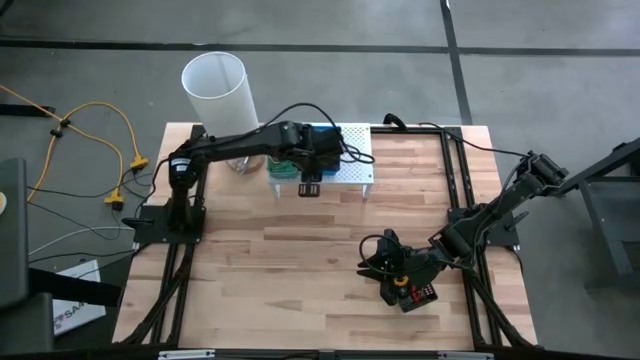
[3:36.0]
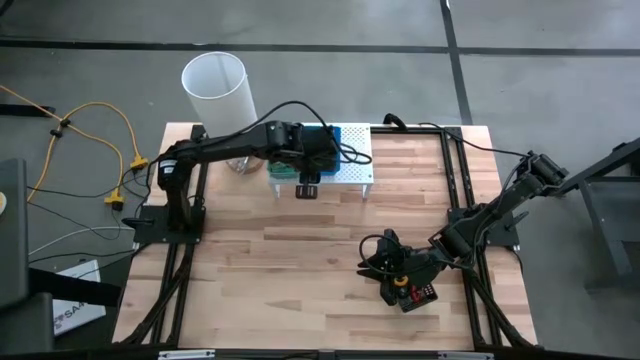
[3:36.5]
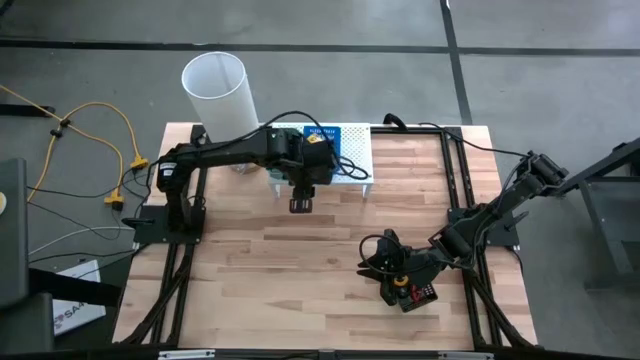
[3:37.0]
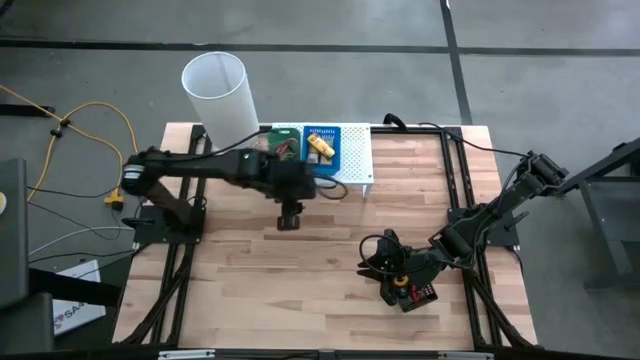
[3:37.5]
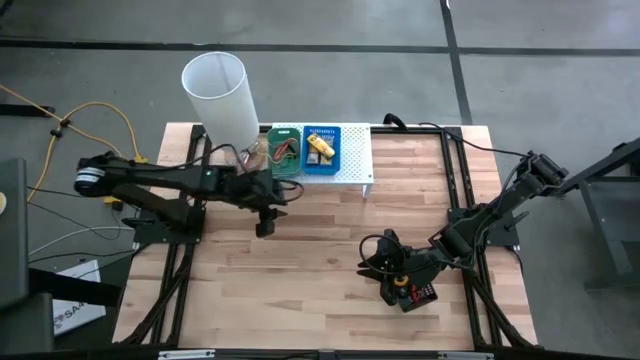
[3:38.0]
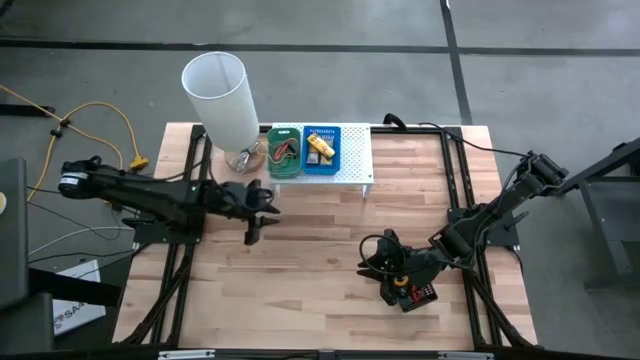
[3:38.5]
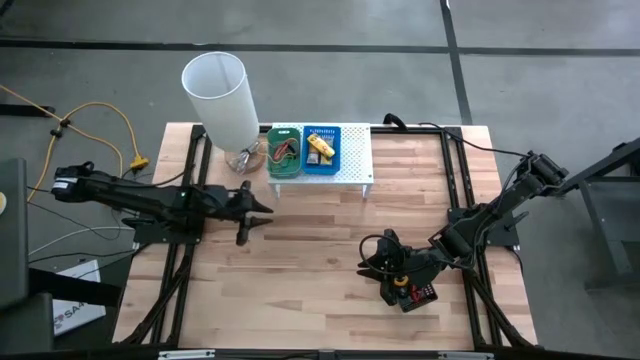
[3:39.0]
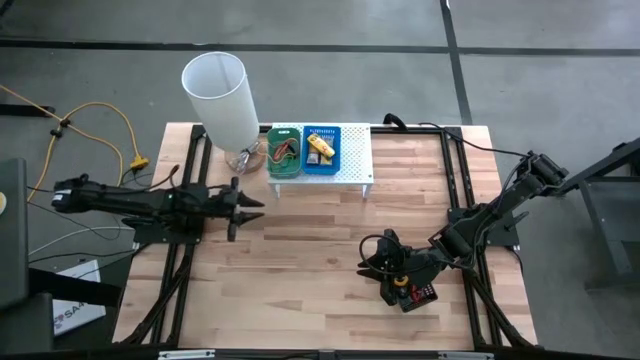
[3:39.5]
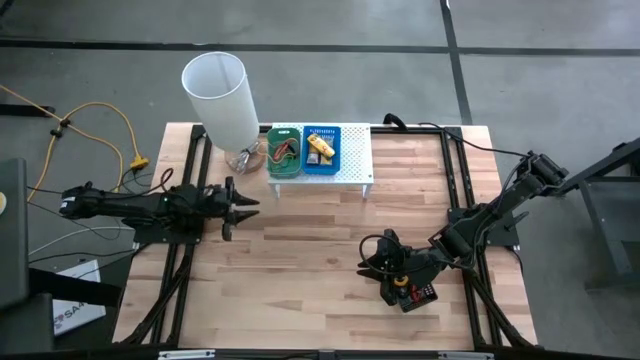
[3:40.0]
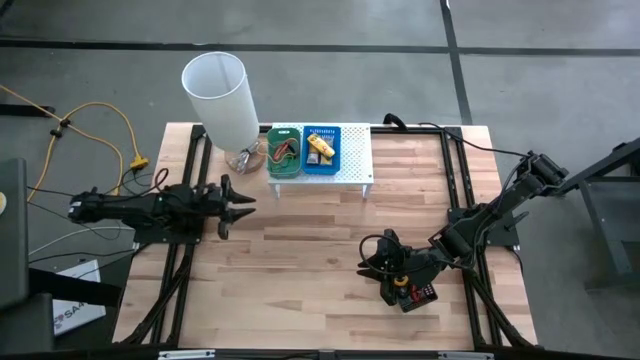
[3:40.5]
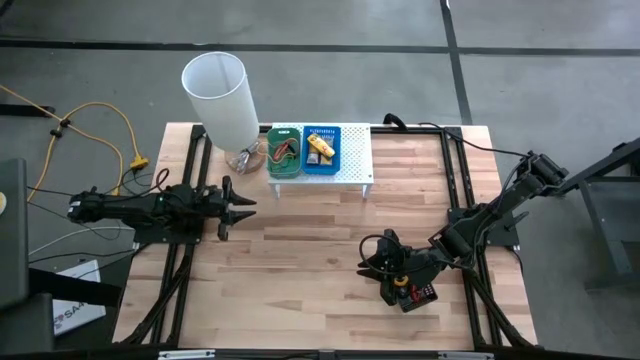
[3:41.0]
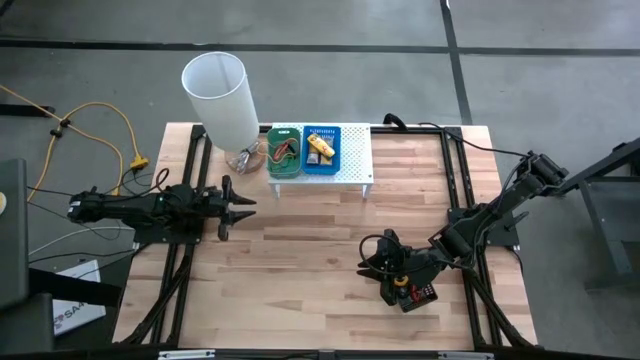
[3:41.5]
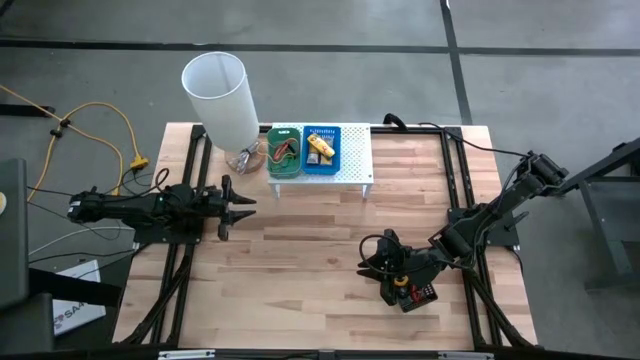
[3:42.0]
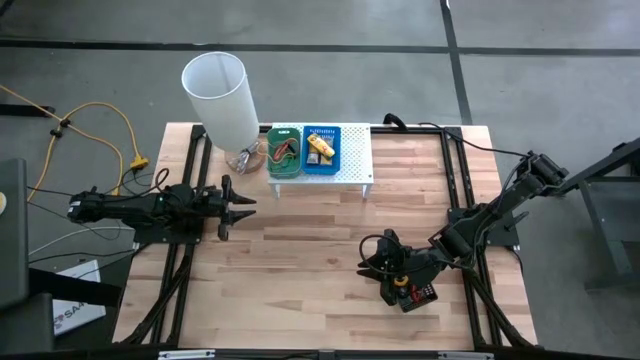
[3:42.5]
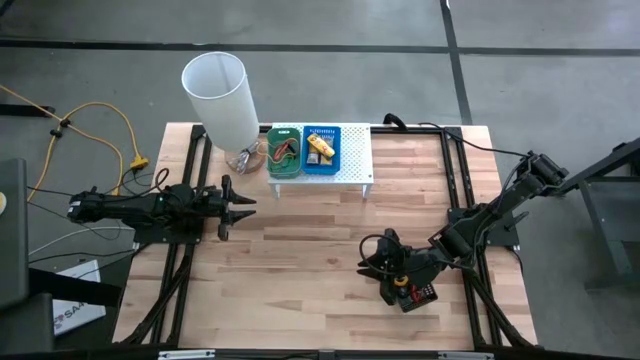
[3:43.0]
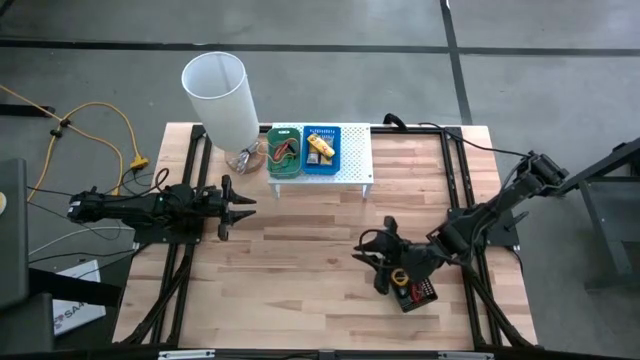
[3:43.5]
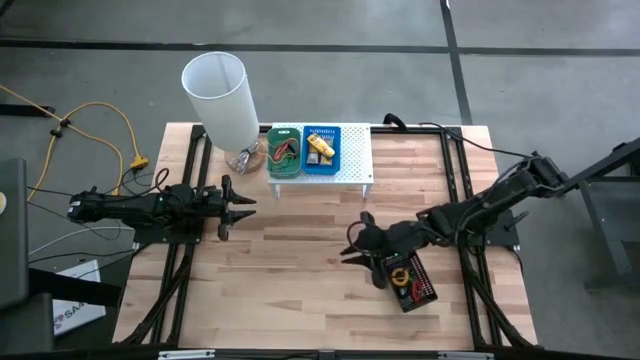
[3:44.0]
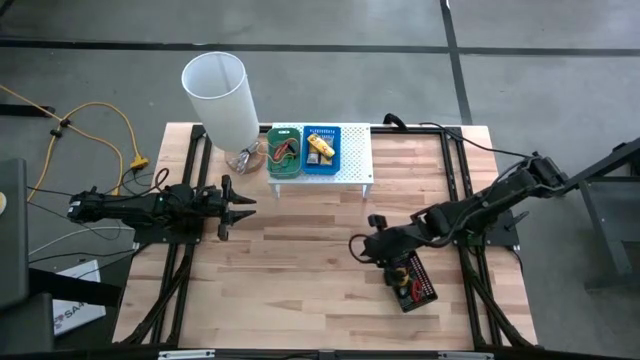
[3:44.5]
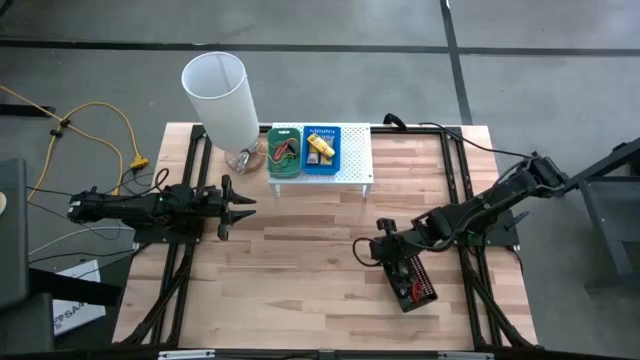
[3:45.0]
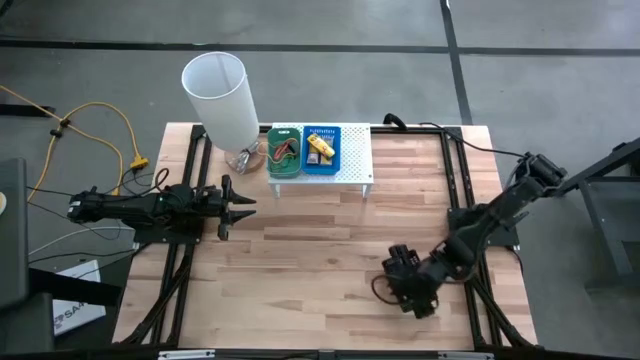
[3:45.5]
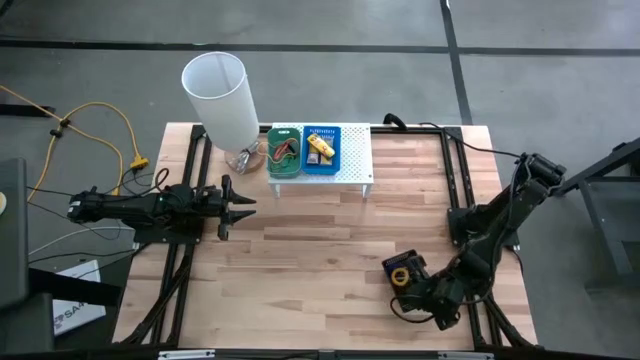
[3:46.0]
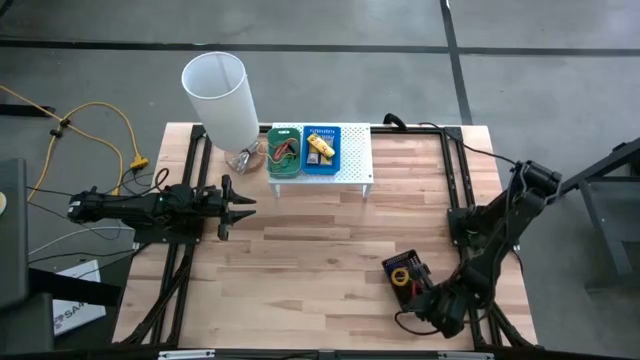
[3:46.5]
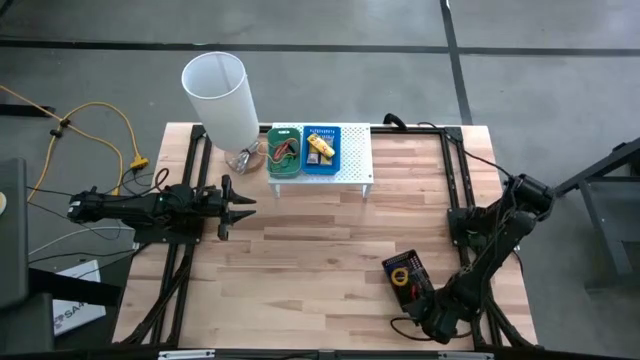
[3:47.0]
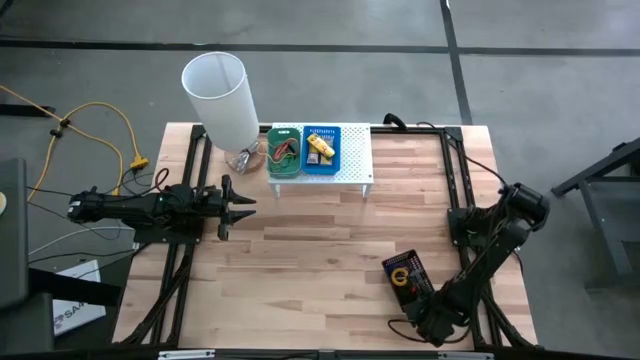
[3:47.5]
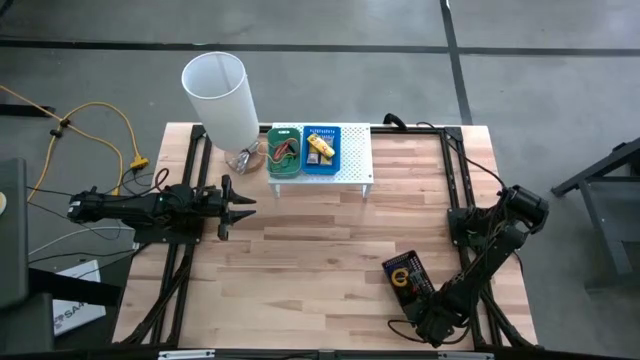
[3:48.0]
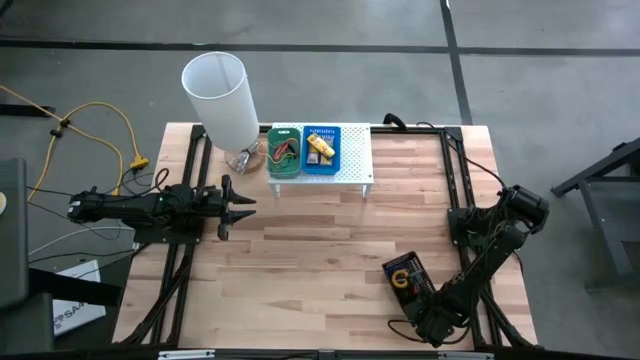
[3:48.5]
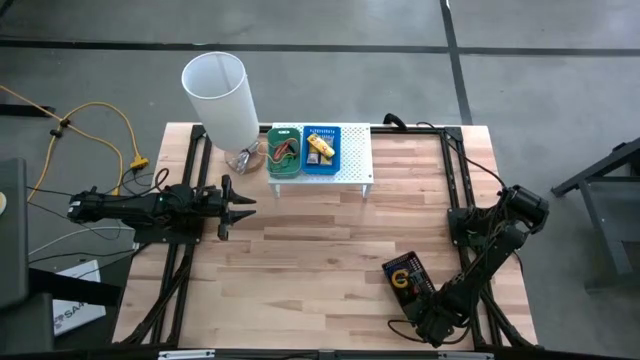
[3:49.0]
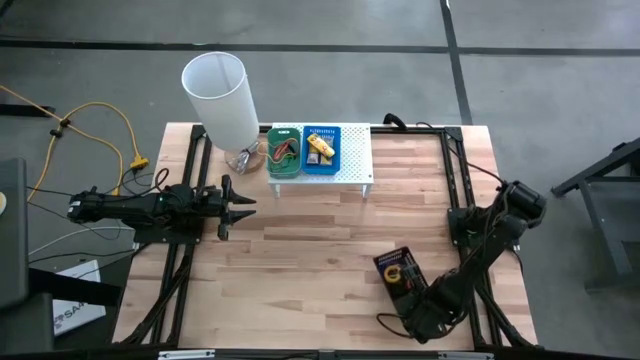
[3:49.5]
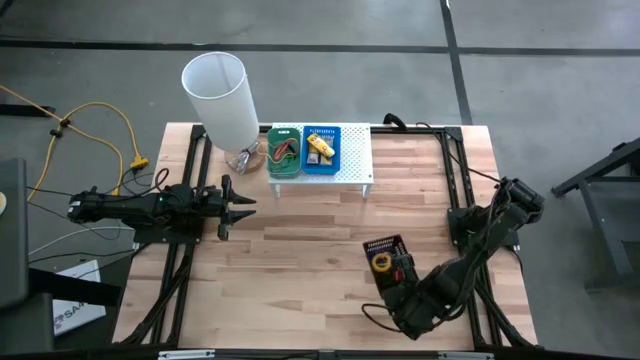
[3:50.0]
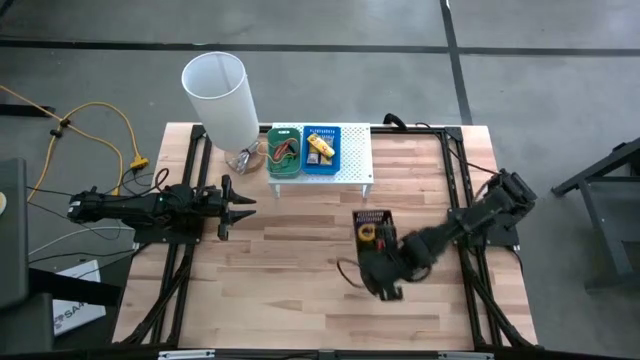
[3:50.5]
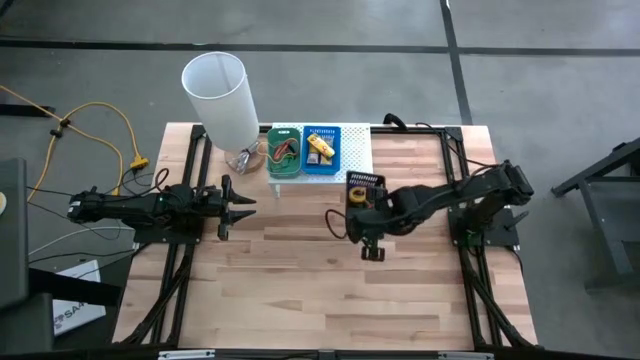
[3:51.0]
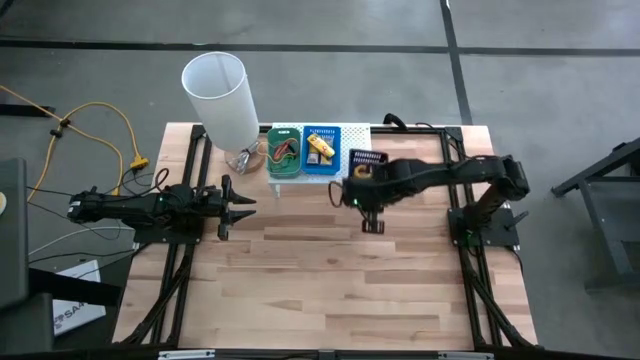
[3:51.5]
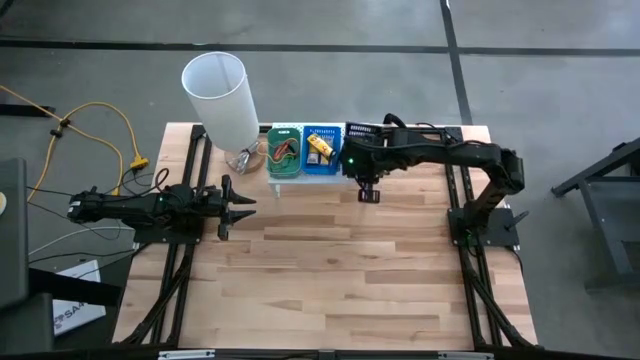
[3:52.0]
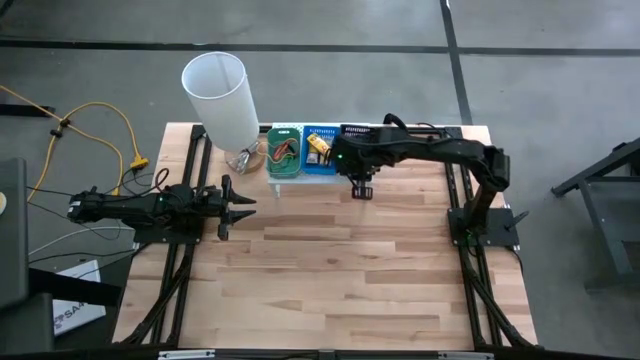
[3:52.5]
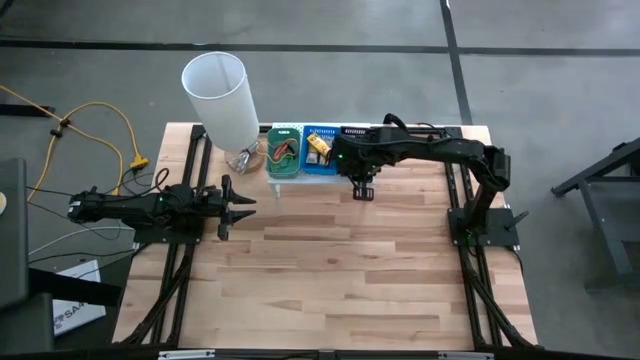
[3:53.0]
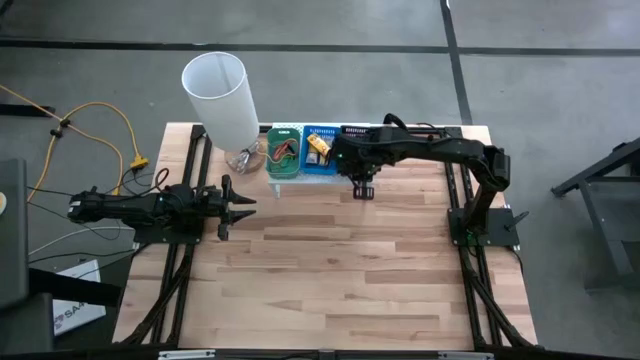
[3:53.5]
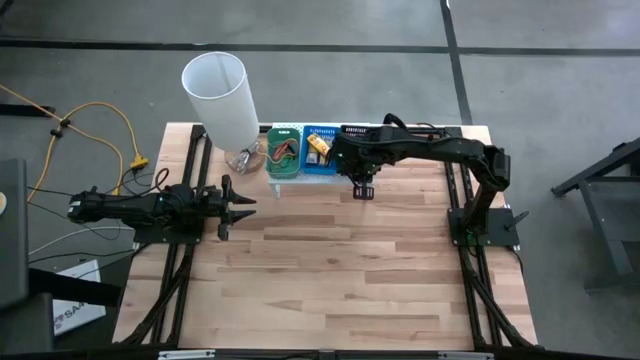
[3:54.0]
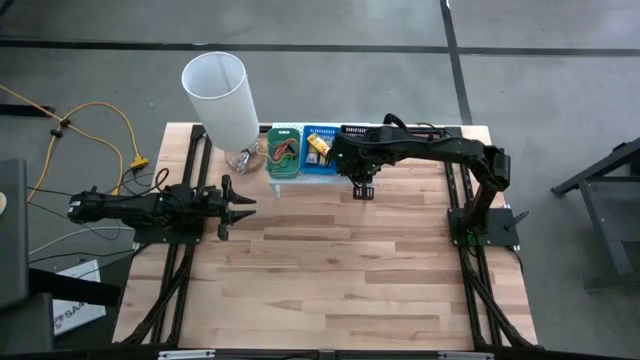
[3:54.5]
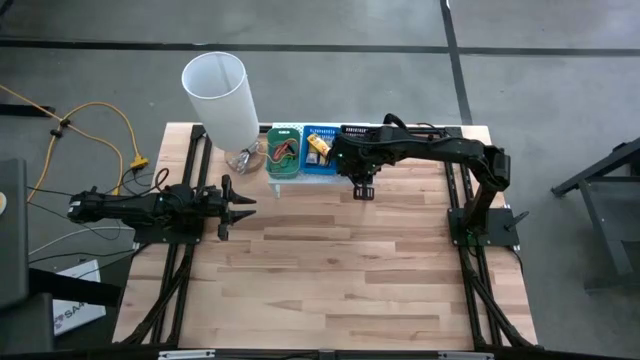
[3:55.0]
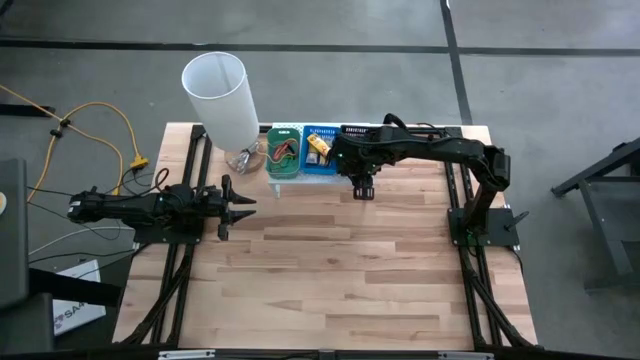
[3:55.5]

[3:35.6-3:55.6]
Task: Pick & Place Office Desk Supplies
Put the black bin with spring rubber bands on the shelf

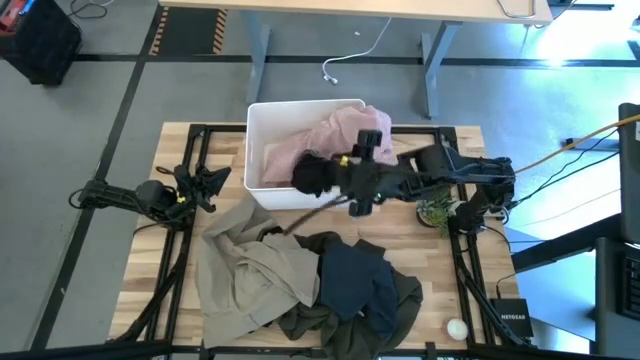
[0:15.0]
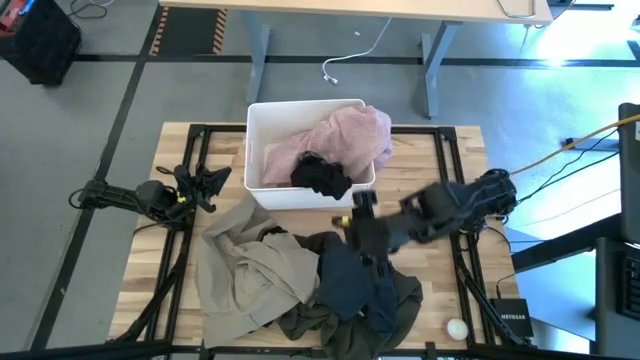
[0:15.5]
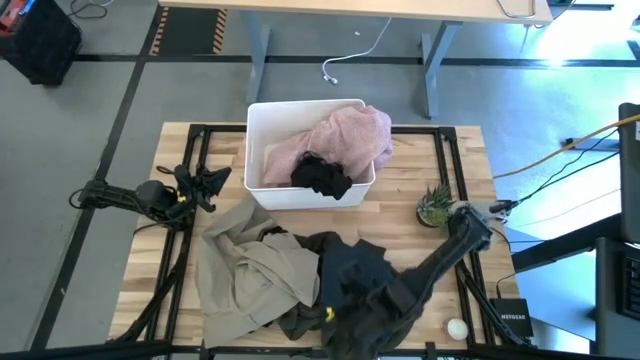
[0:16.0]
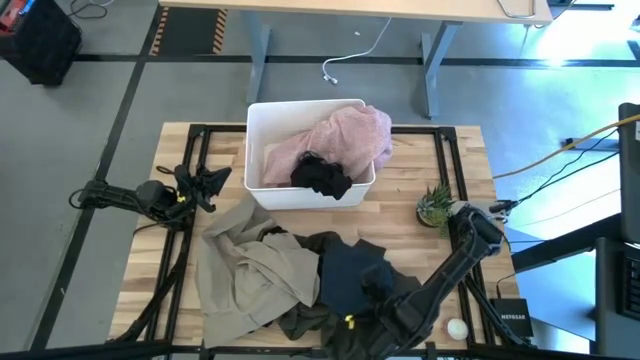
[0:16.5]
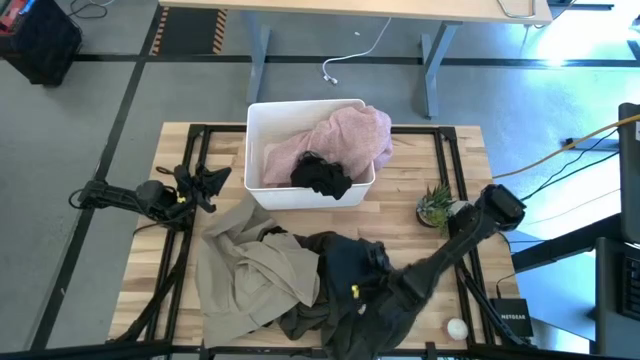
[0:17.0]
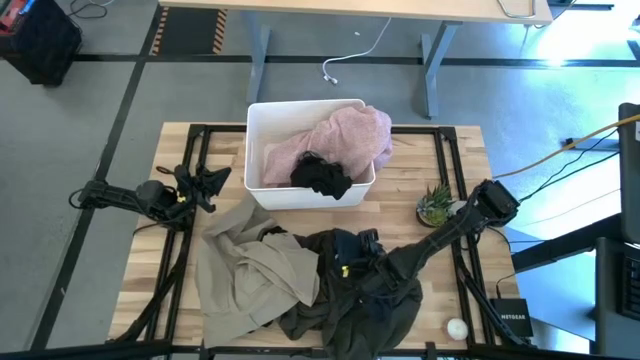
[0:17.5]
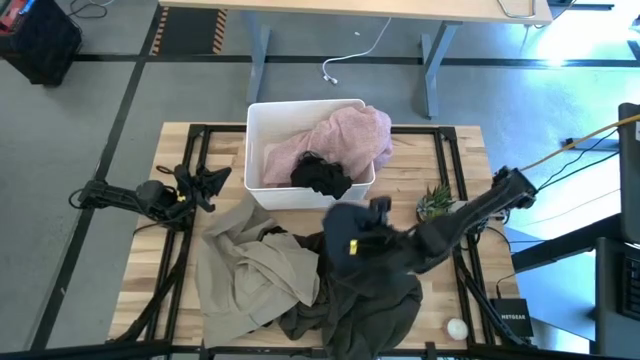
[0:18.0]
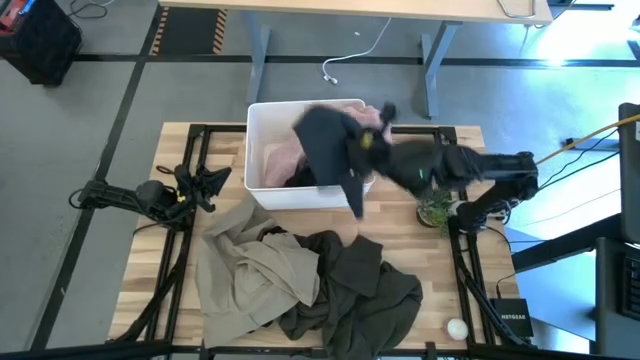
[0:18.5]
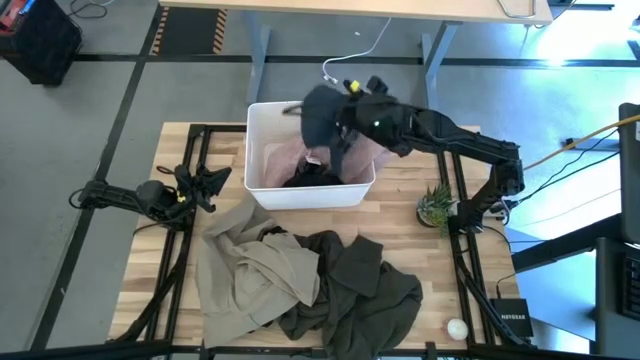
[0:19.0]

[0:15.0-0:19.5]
Task: Sort clothes
Put the dark blue shirt into the white bin
